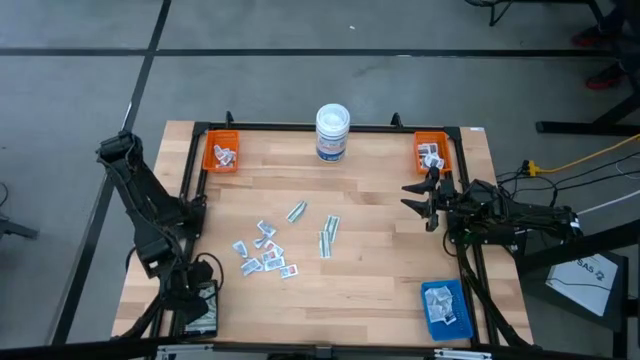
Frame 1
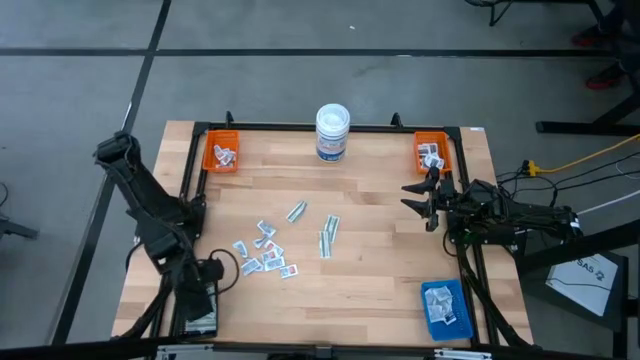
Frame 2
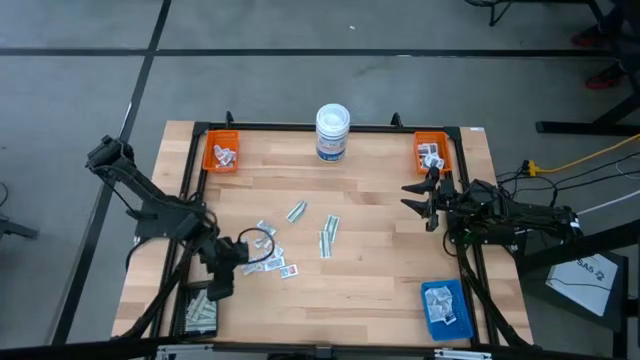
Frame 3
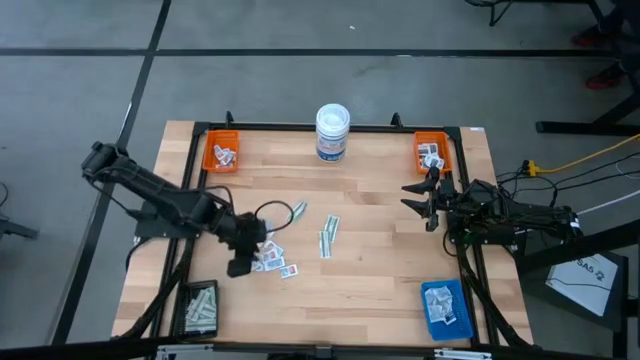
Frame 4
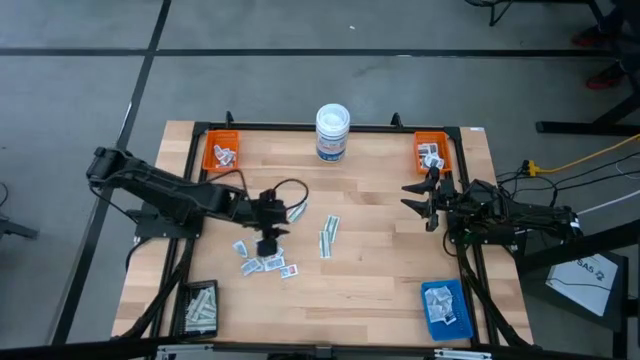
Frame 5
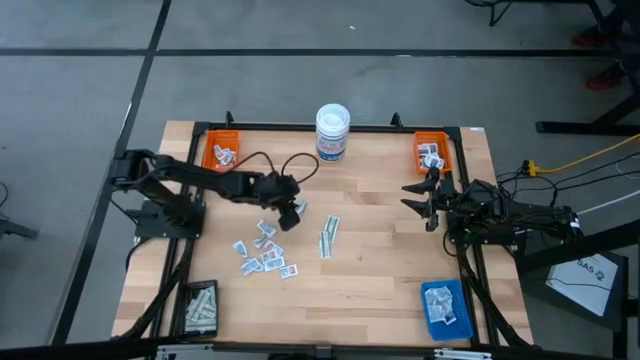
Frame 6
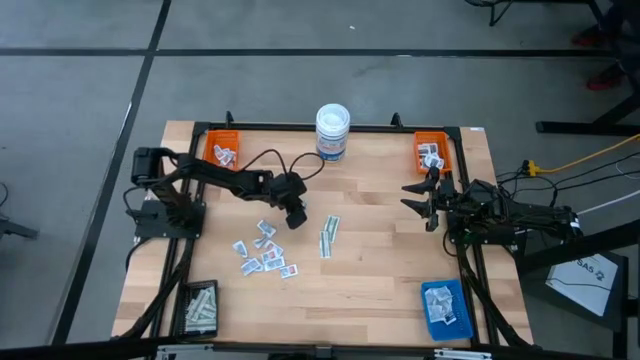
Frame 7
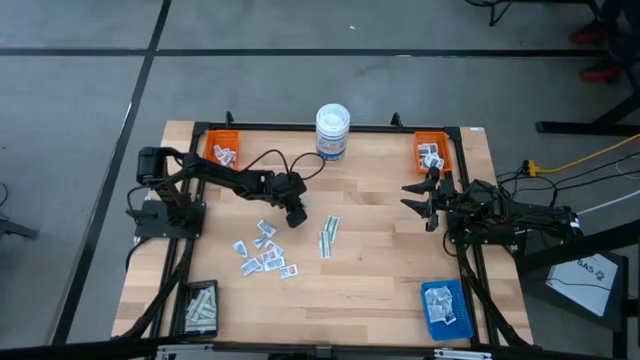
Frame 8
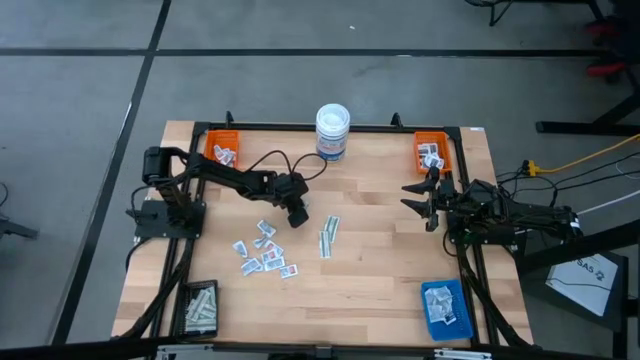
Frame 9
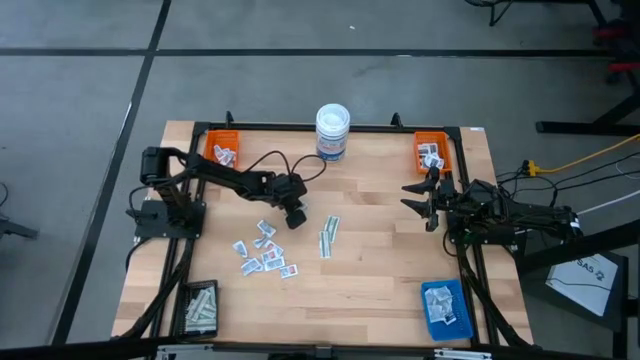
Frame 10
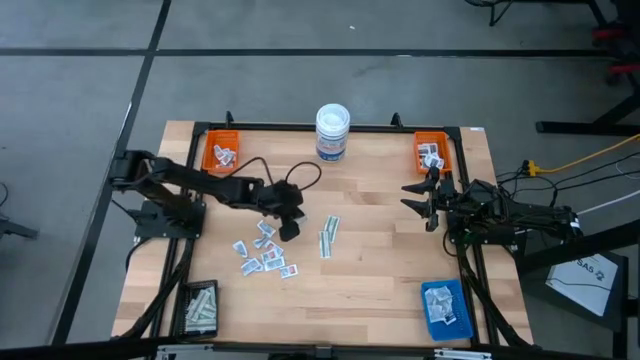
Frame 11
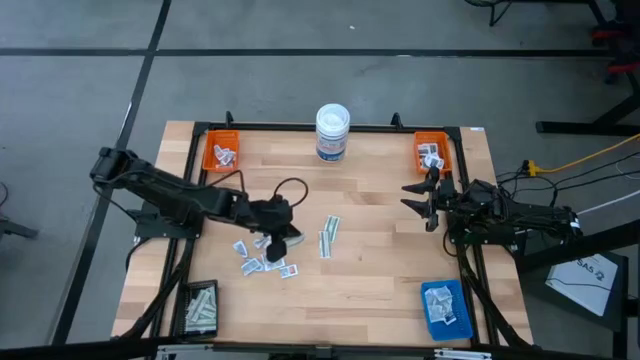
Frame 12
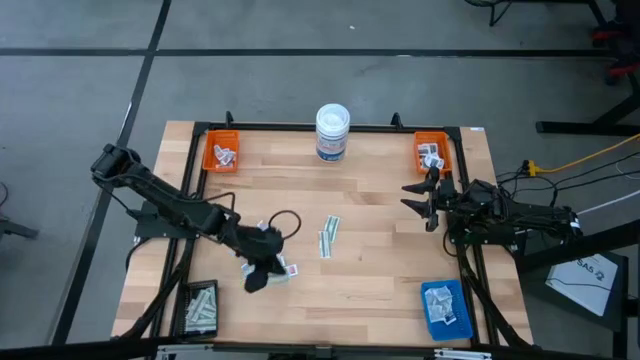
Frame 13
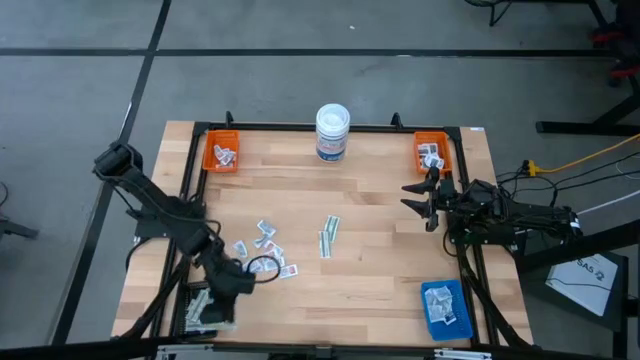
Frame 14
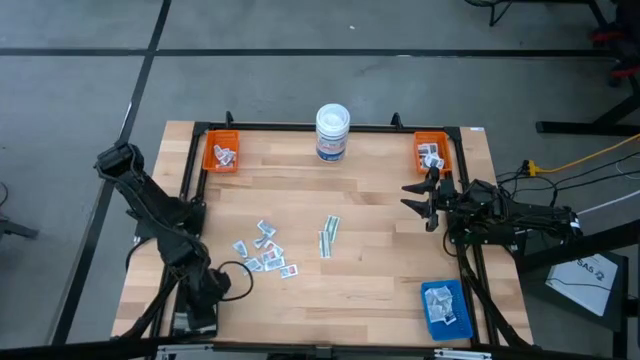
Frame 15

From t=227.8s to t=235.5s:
Task: Pick & Place First Aid Supplies
Put the green bandage pack into the black bin

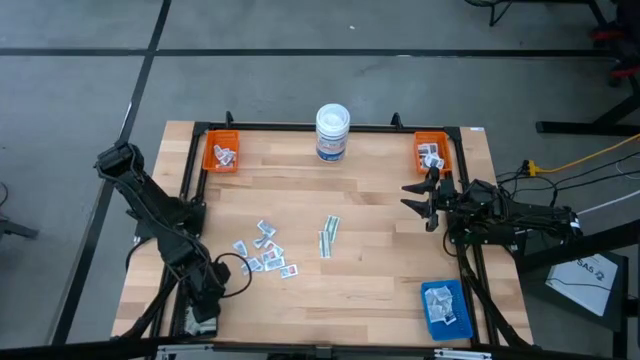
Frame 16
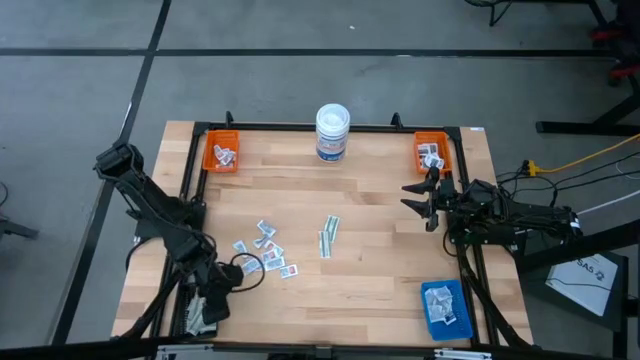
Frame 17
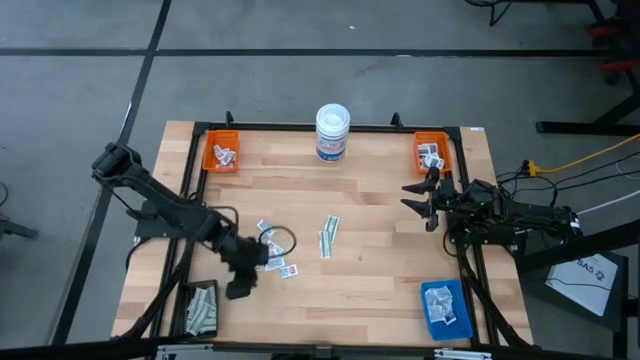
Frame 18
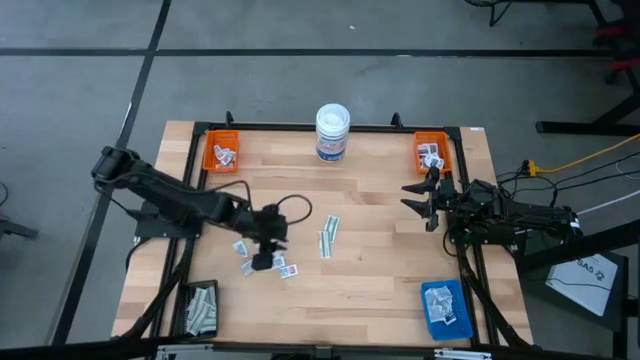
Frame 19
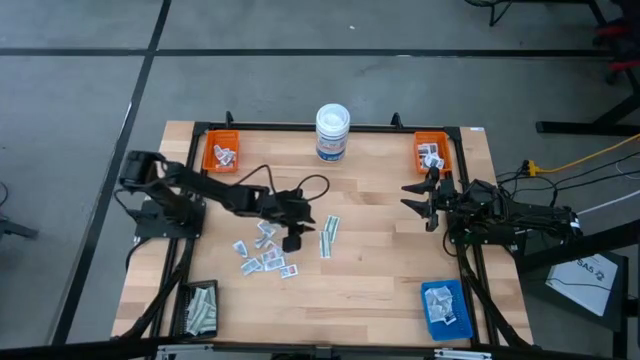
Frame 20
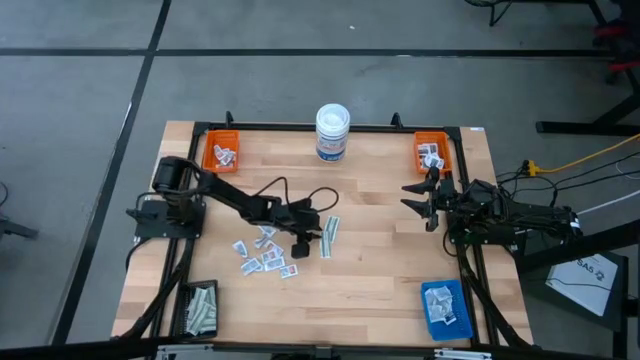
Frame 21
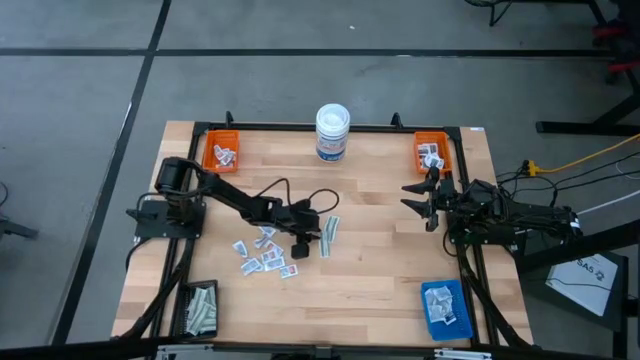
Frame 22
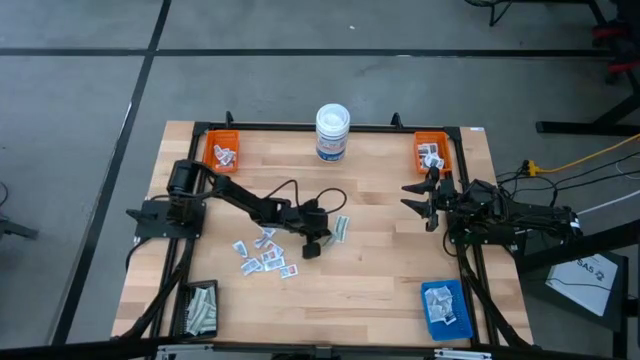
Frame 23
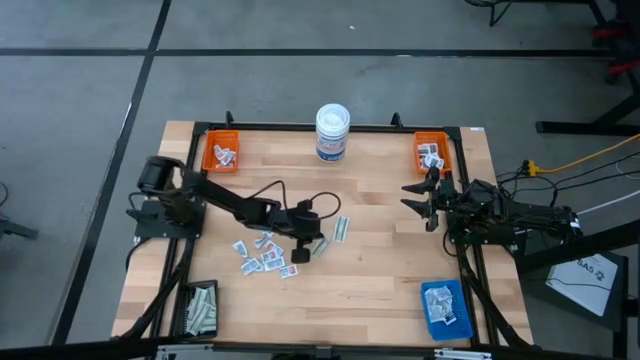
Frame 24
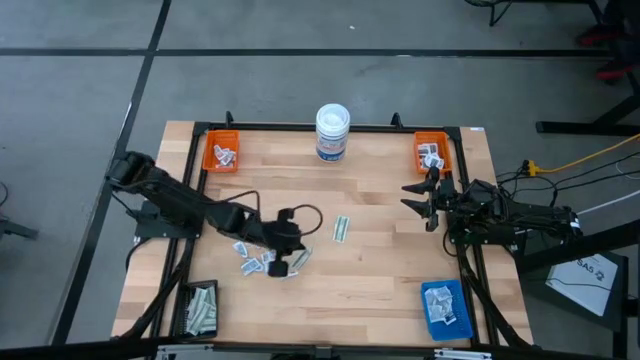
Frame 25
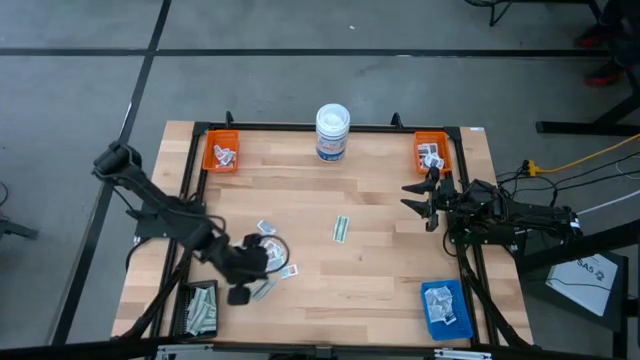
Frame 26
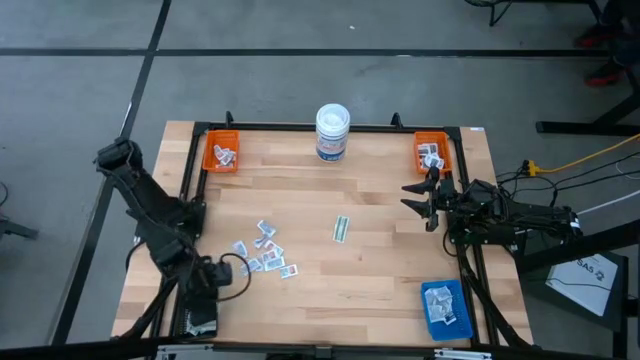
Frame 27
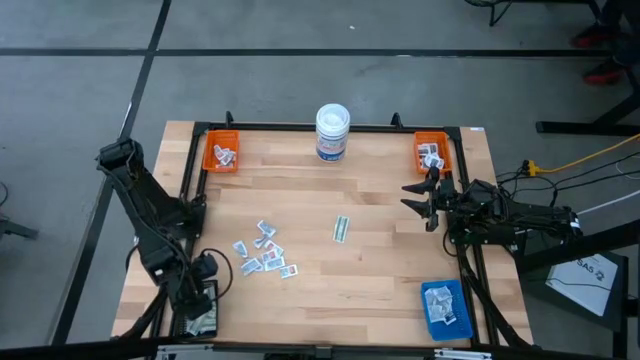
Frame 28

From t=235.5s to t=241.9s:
Put the green bandage pack into the black bin

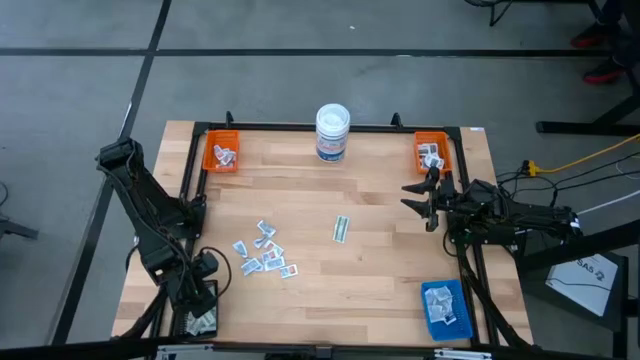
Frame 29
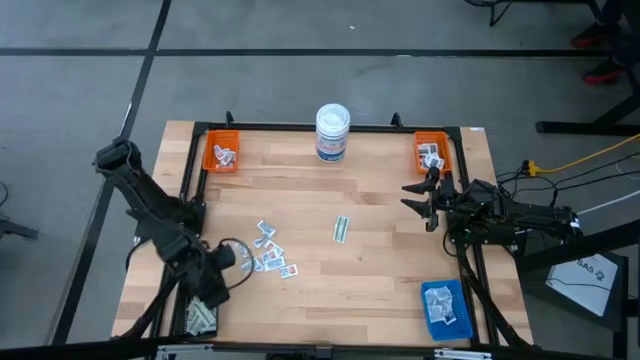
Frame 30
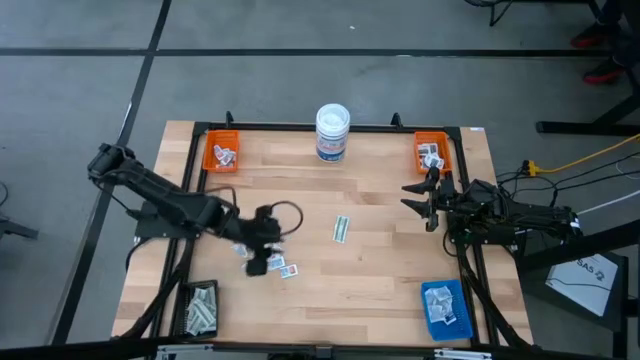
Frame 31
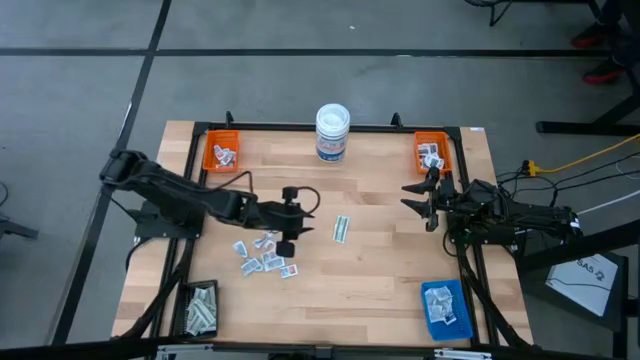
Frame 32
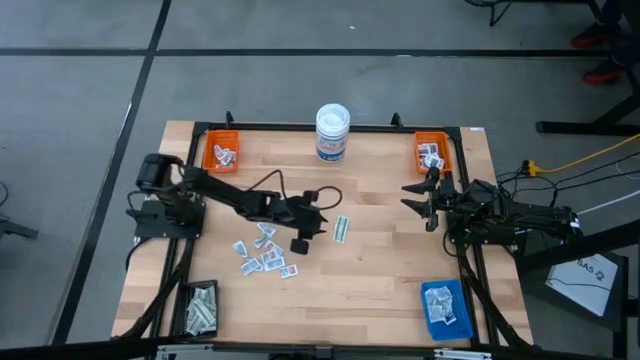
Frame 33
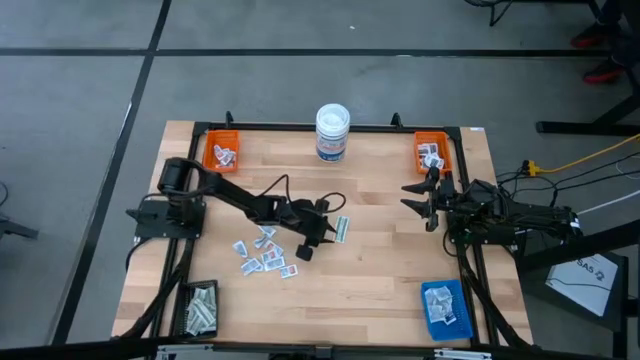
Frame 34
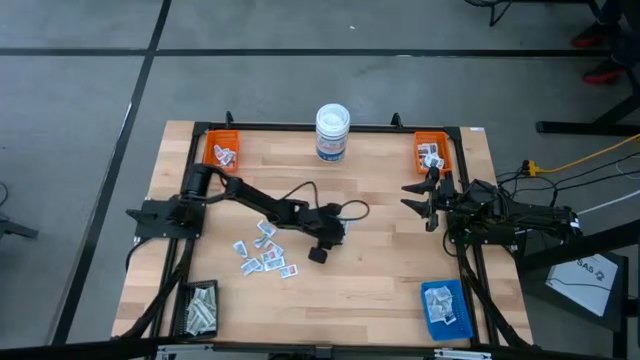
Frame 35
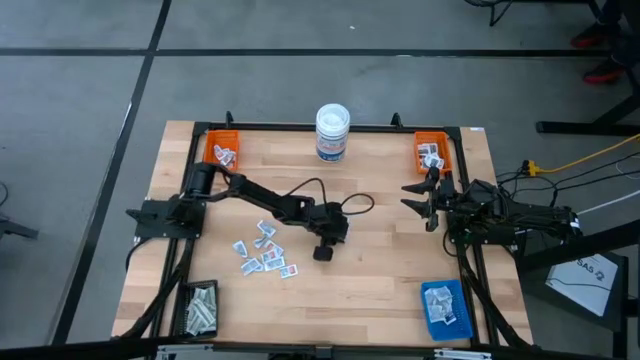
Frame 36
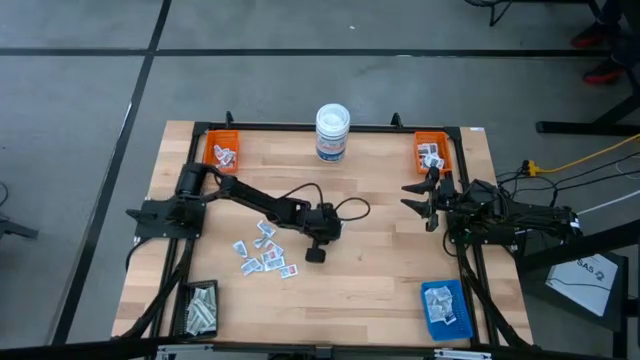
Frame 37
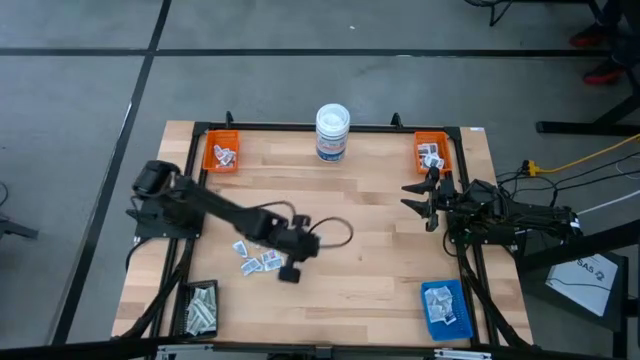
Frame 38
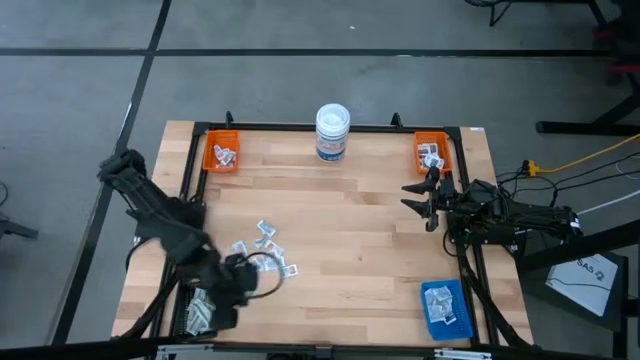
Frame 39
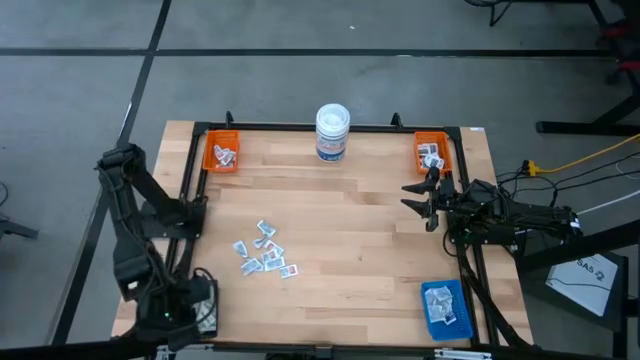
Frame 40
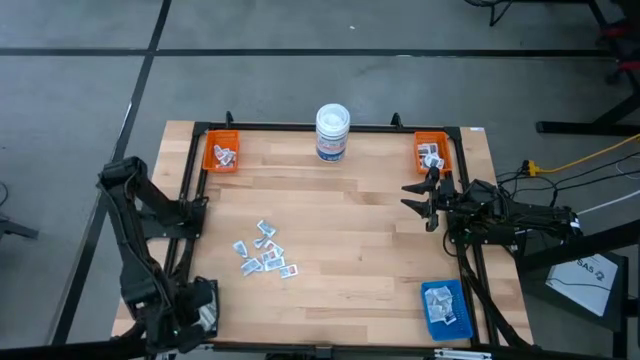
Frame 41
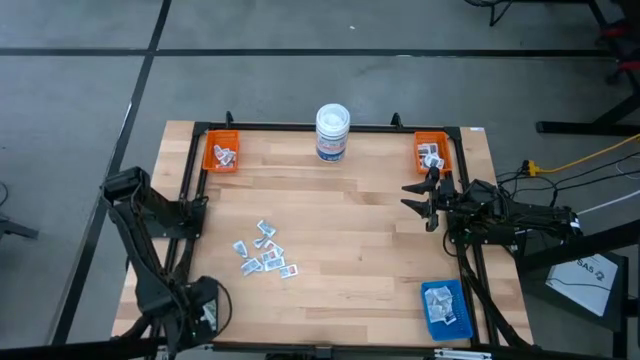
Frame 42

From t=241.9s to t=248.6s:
Put the green bandage pack into the black bin

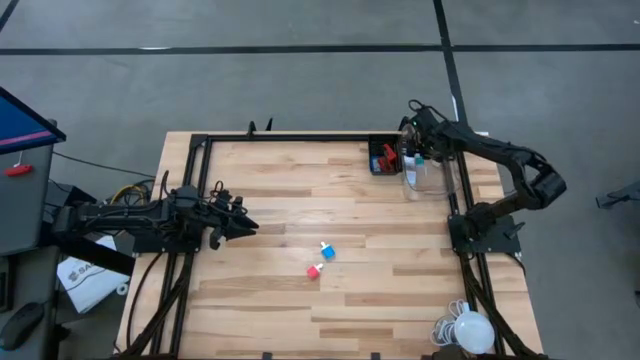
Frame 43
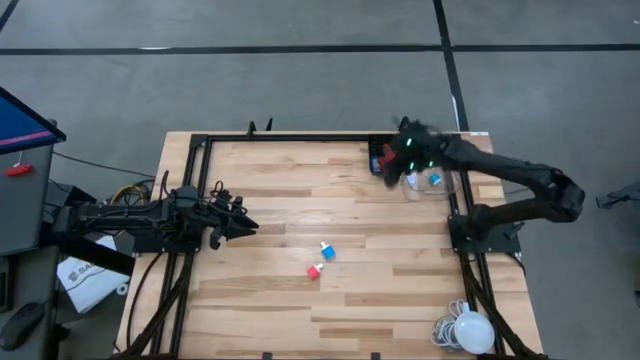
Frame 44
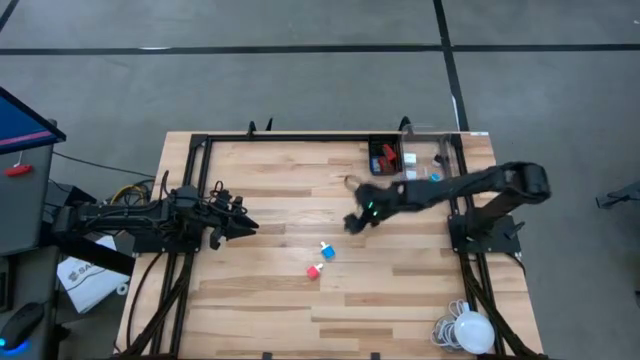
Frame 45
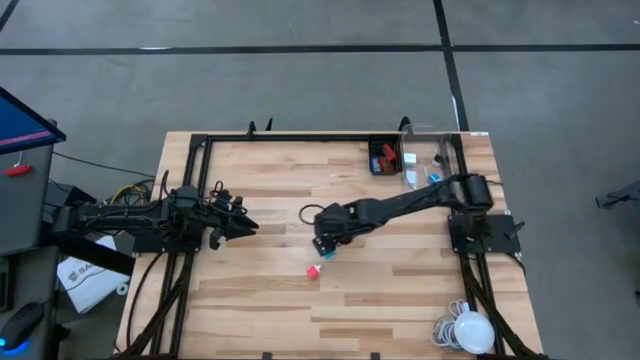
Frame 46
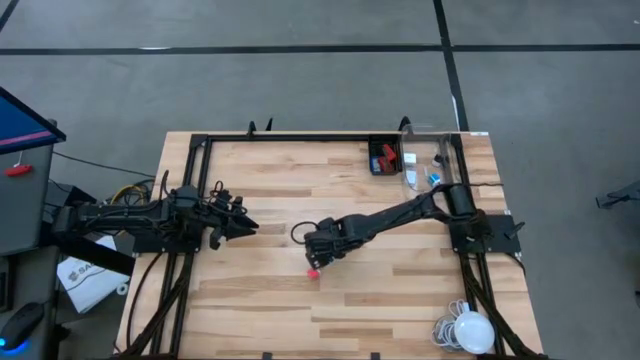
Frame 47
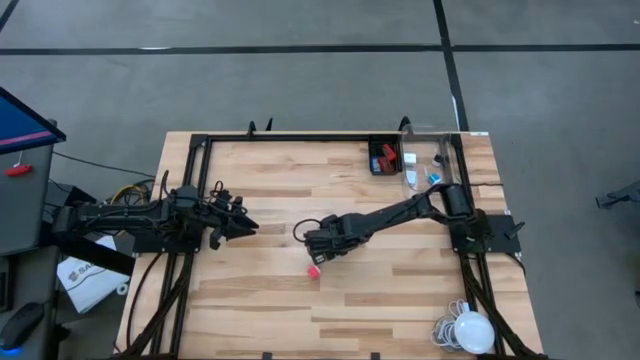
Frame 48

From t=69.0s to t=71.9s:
Task: Pick & Place Office items
Put the blue and white charger adapter into the transparent bin
